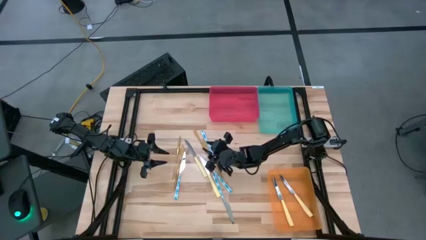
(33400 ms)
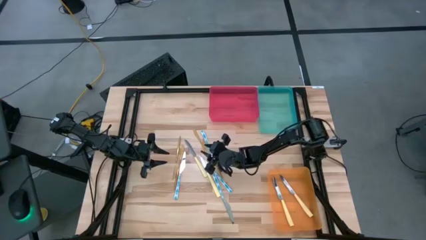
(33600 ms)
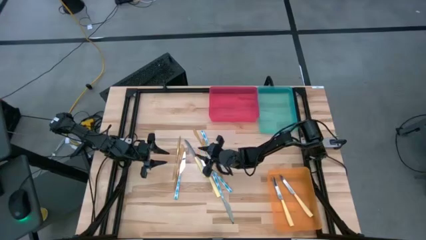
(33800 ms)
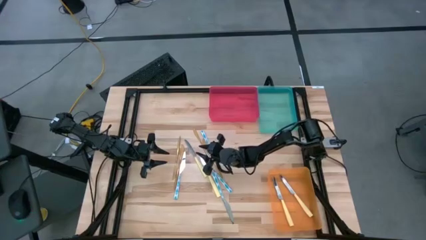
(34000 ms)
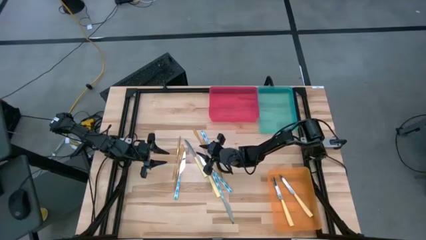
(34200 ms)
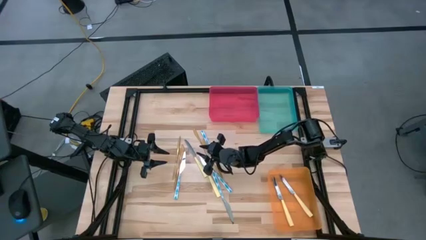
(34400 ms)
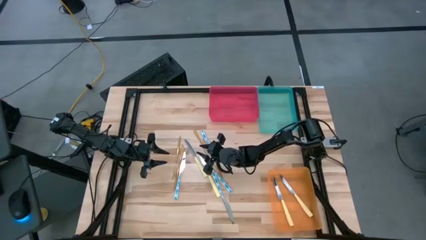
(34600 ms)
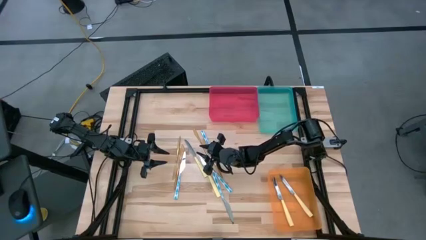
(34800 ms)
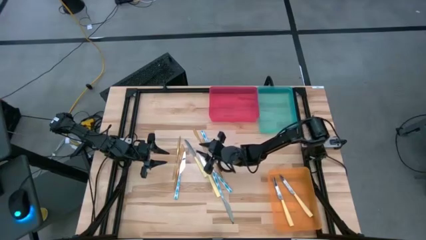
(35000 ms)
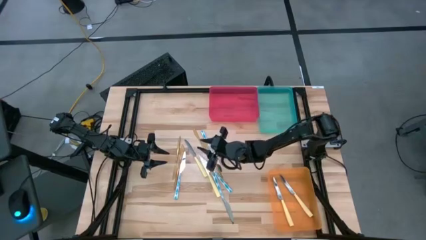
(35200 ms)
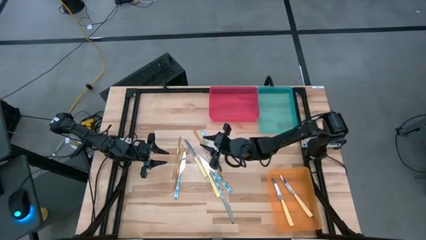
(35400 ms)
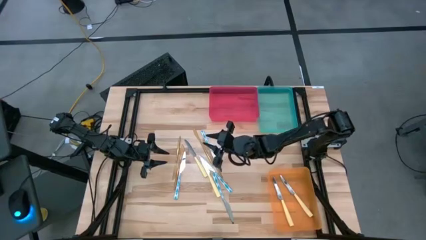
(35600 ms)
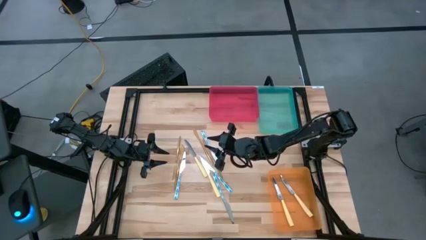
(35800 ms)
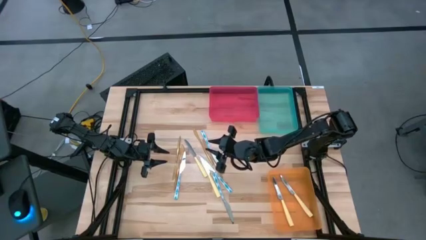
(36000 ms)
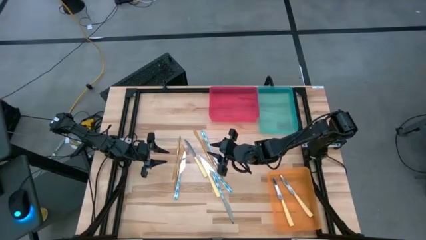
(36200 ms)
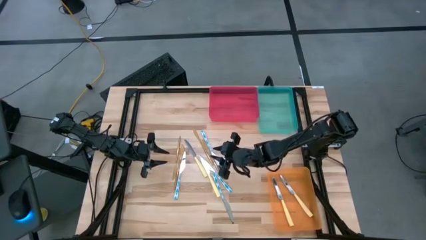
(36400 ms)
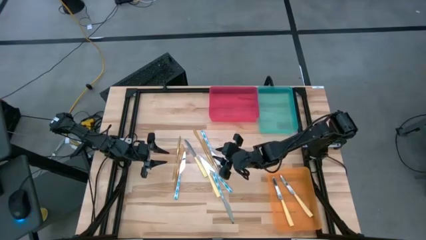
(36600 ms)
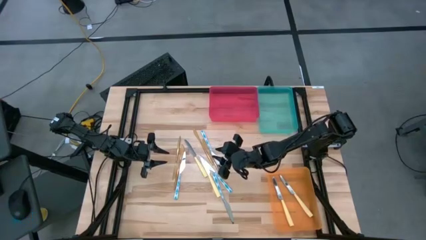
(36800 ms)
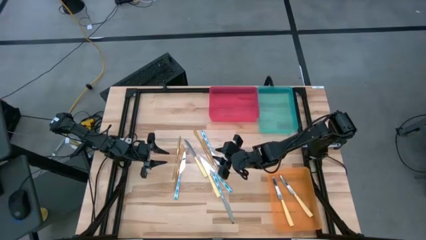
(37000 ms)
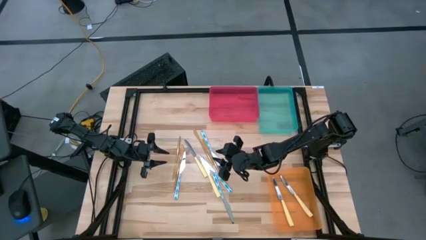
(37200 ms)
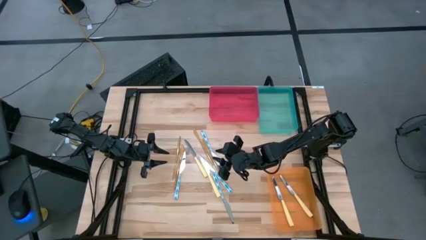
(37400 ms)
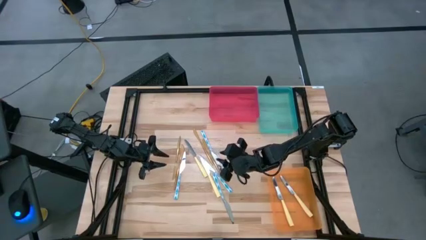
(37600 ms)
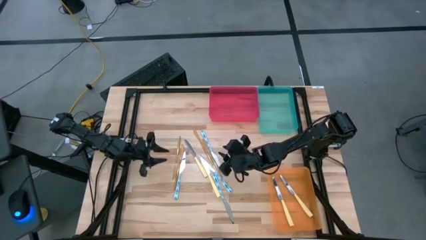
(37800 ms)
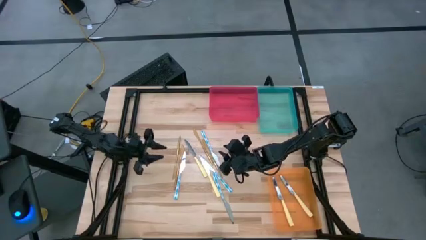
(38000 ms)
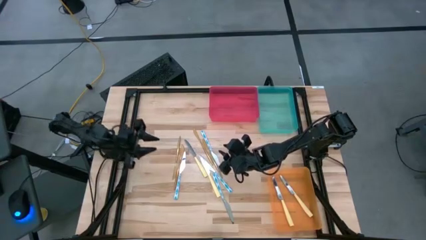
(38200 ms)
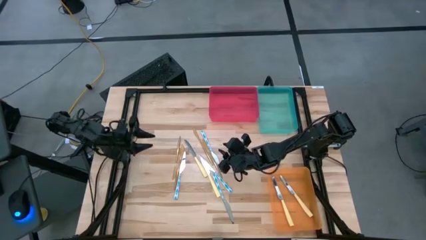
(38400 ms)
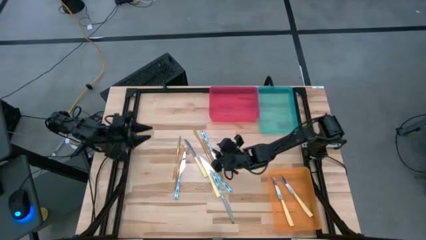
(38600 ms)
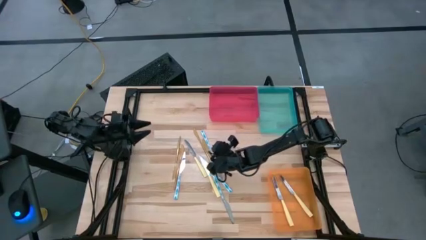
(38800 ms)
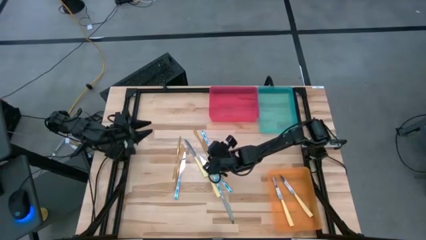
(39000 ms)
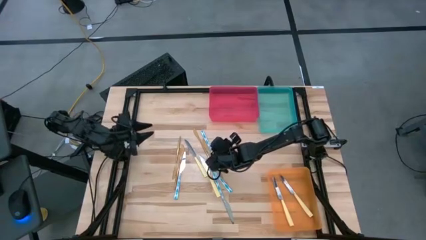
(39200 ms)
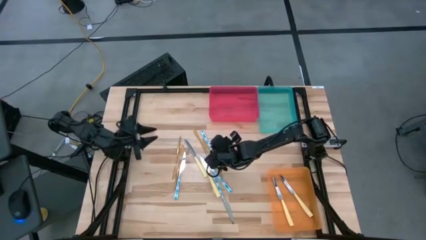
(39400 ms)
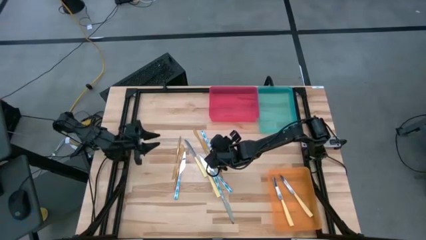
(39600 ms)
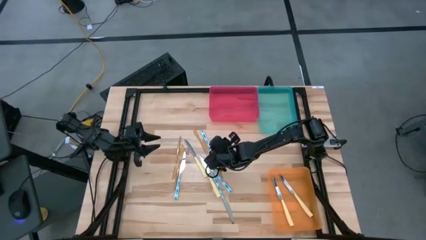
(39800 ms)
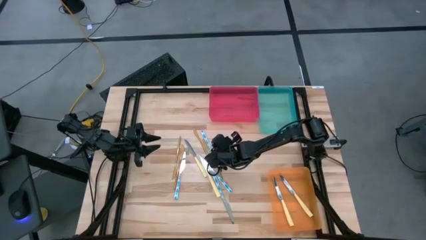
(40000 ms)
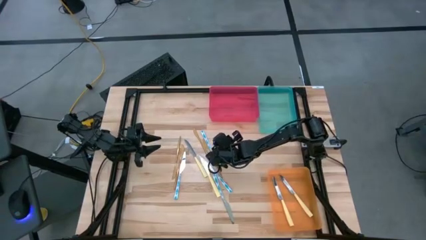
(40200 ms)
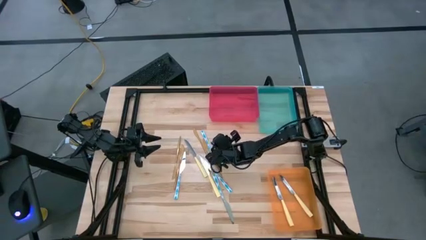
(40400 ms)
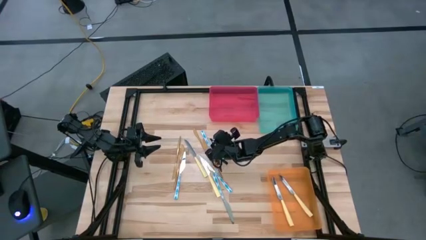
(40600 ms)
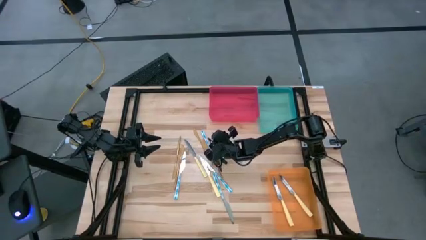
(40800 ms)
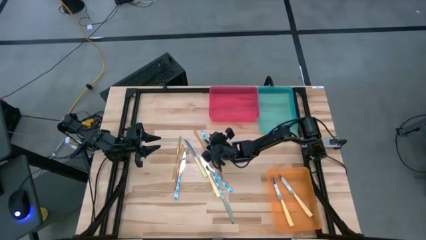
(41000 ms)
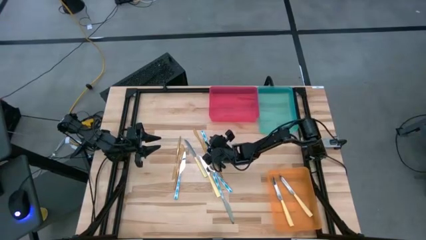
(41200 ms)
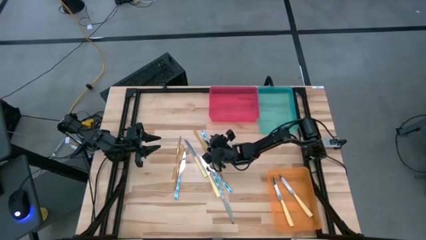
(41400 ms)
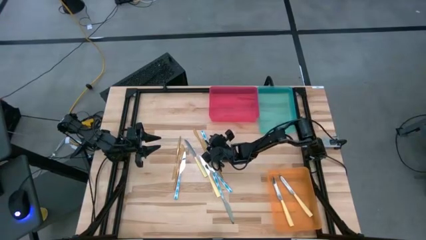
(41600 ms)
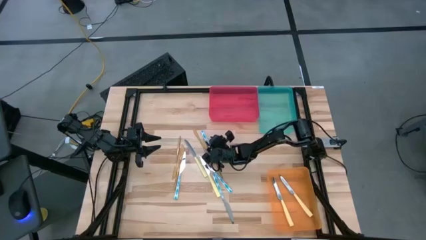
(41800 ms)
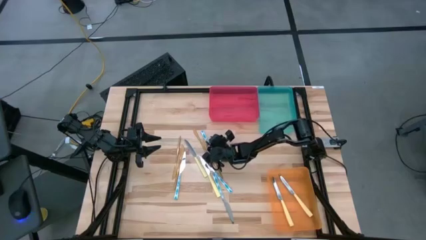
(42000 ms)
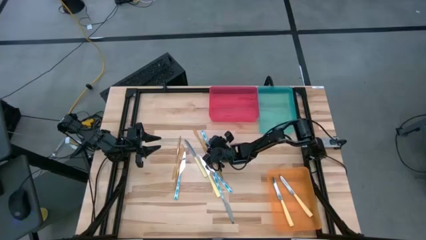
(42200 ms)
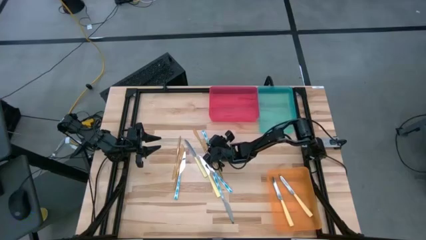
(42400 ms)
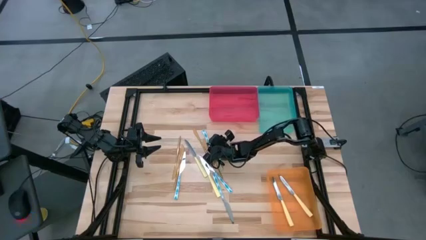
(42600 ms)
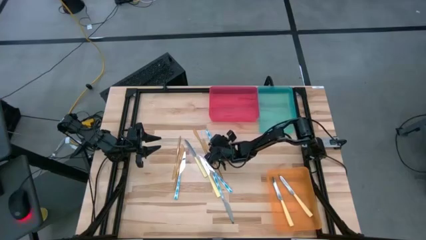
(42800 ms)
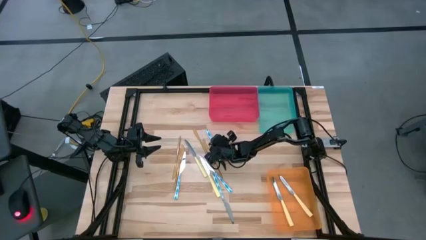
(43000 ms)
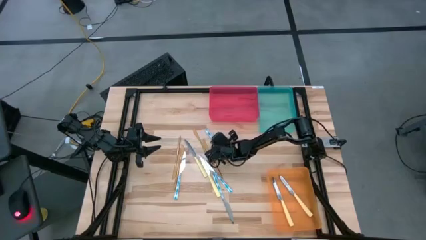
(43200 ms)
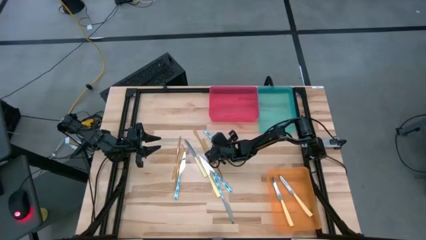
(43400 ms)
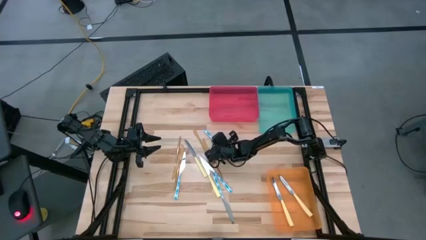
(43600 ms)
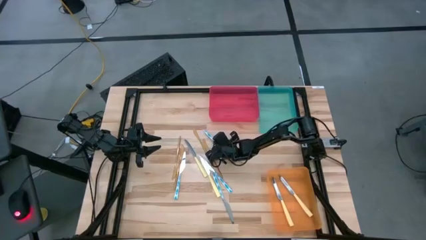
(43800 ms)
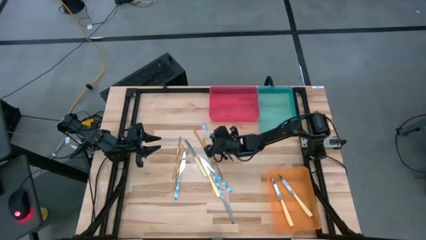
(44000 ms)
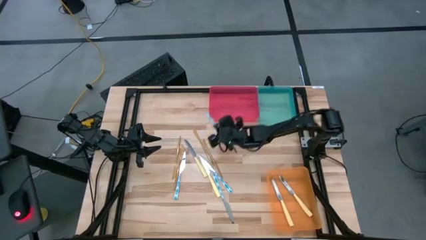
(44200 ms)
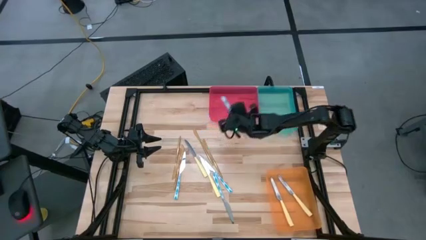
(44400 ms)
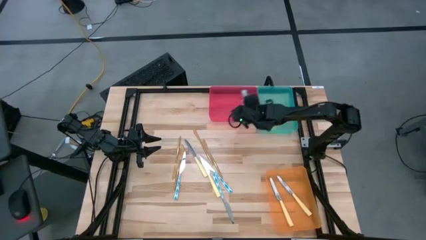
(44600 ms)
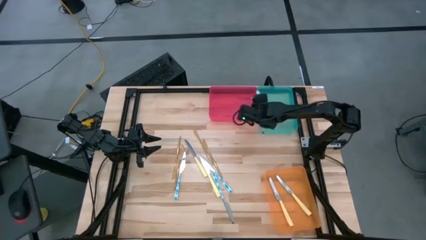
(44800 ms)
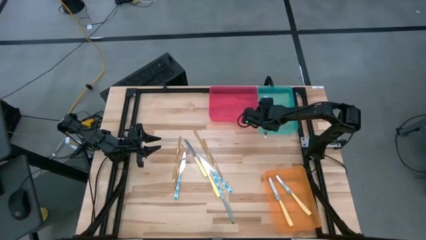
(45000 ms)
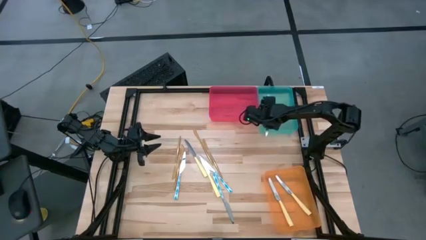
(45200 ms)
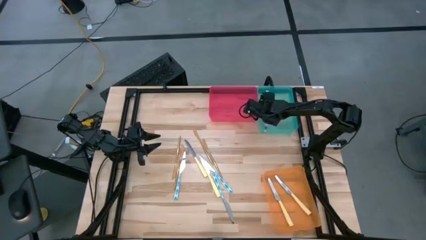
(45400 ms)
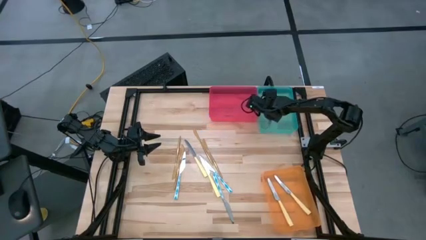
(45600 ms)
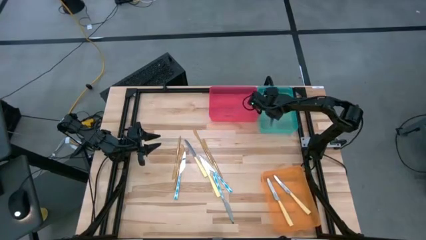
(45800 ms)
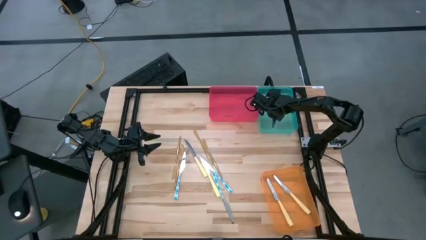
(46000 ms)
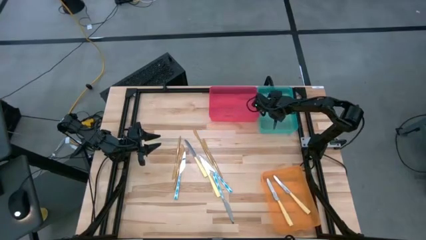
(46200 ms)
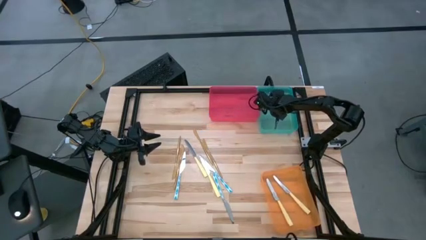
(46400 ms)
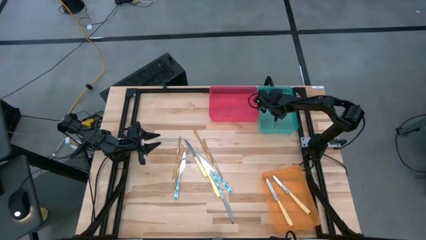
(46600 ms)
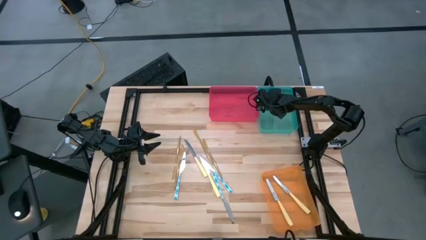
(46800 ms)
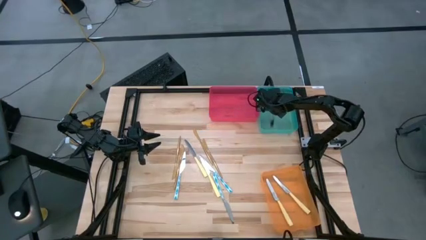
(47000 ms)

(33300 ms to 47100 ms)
Task: Sort silverware by color (type)
Put the blue knife into the blue bin
